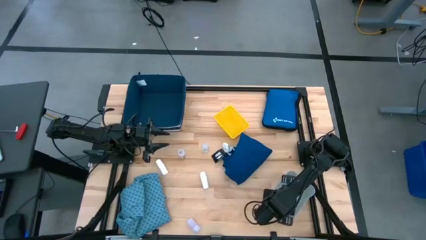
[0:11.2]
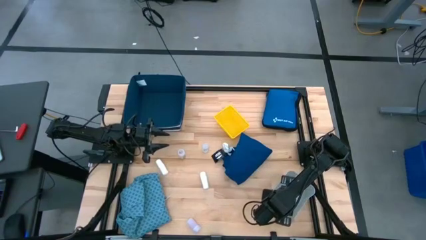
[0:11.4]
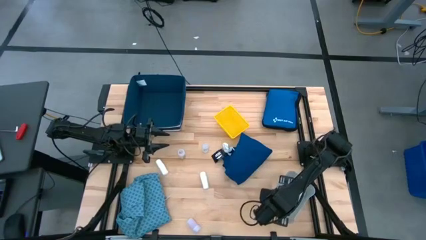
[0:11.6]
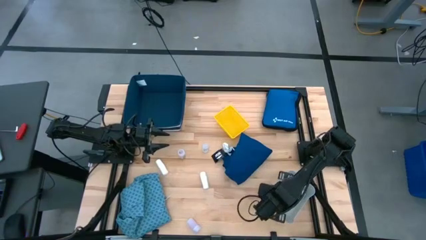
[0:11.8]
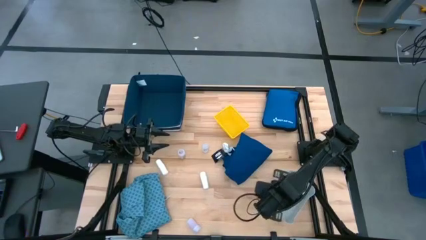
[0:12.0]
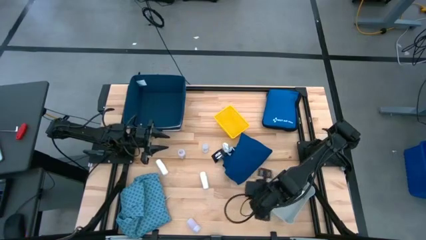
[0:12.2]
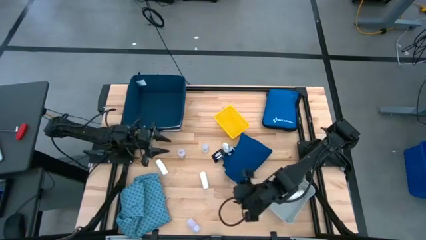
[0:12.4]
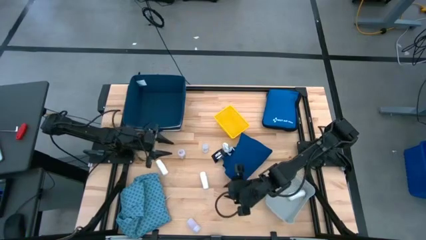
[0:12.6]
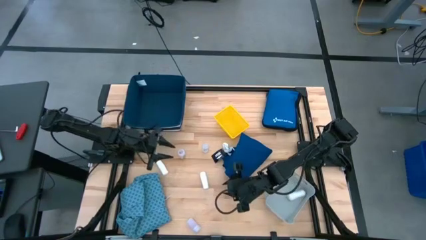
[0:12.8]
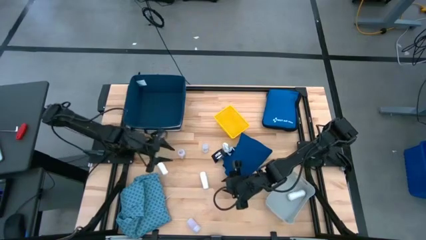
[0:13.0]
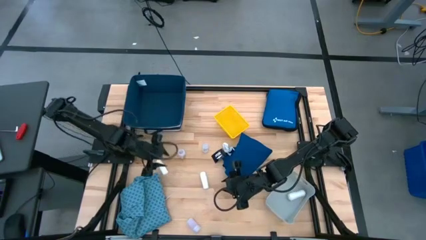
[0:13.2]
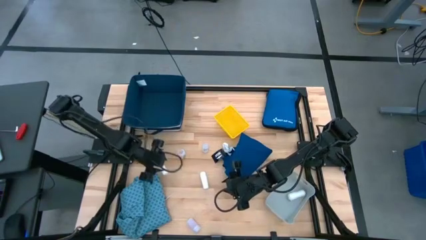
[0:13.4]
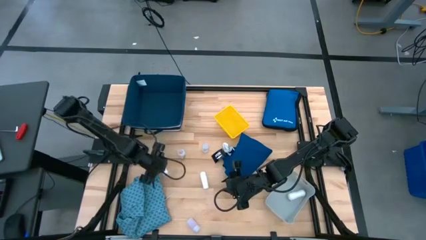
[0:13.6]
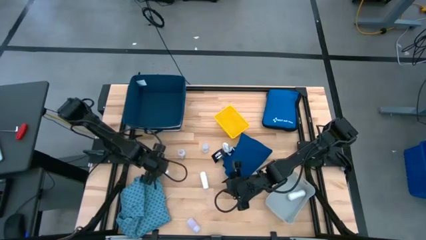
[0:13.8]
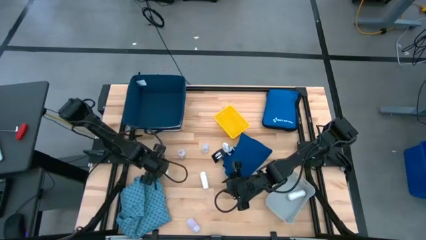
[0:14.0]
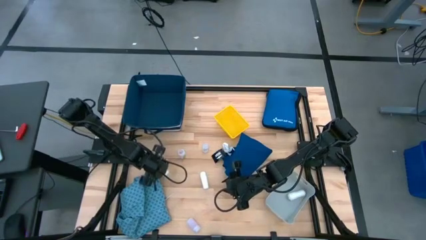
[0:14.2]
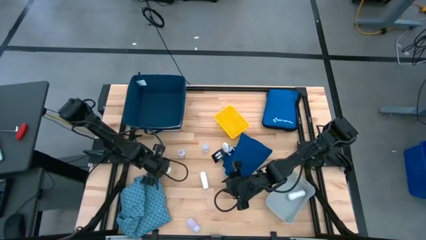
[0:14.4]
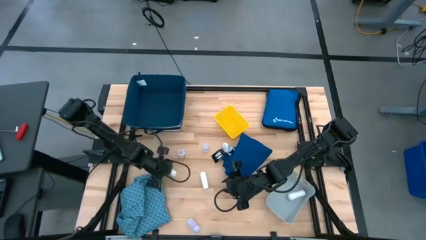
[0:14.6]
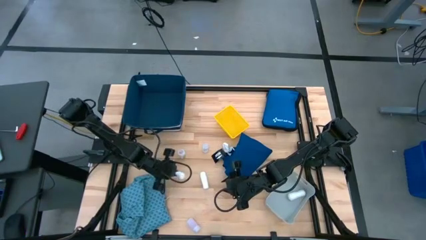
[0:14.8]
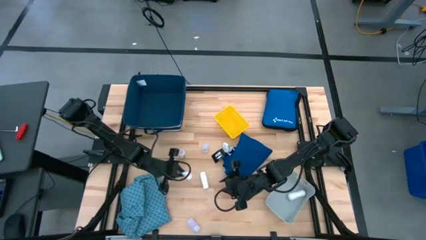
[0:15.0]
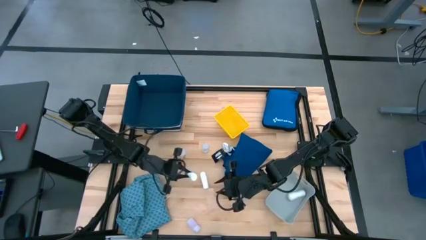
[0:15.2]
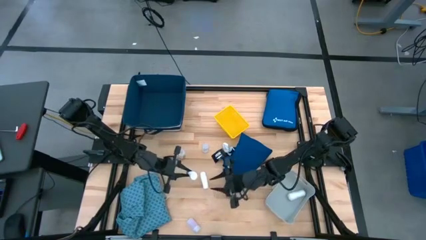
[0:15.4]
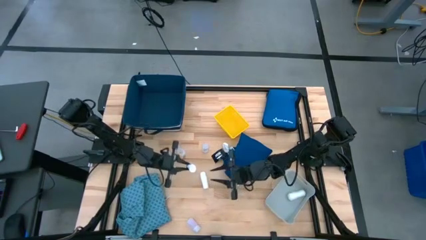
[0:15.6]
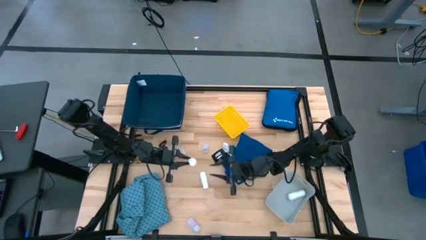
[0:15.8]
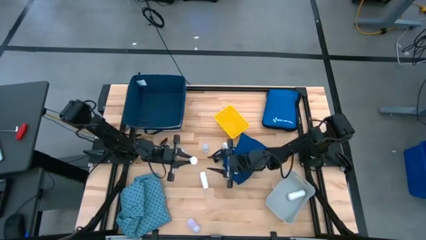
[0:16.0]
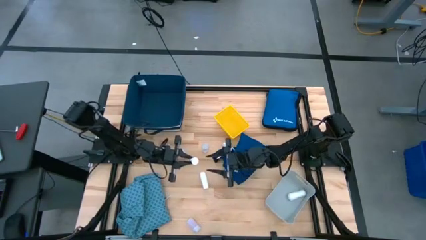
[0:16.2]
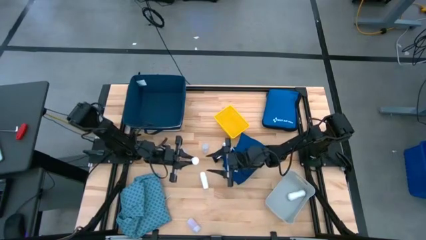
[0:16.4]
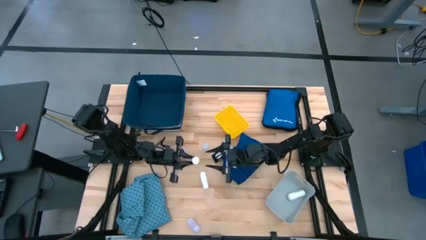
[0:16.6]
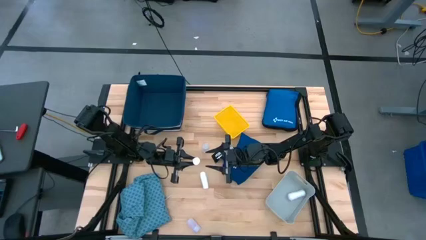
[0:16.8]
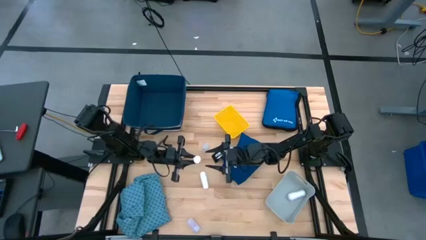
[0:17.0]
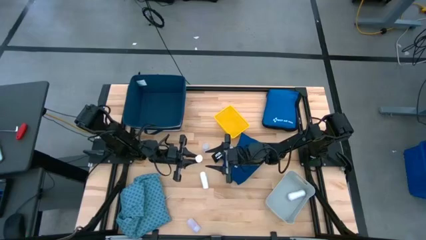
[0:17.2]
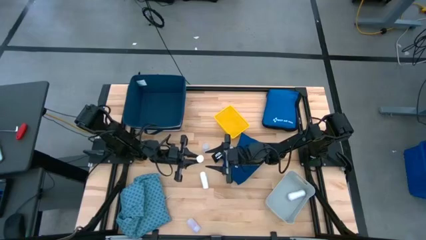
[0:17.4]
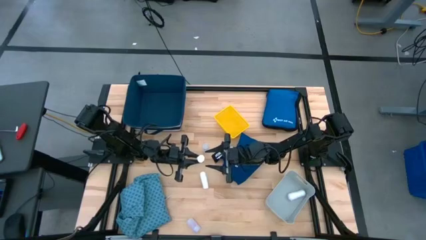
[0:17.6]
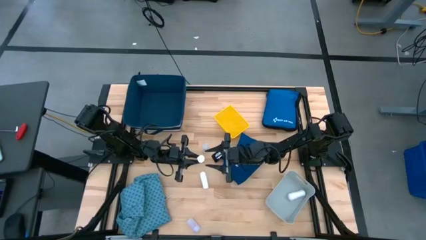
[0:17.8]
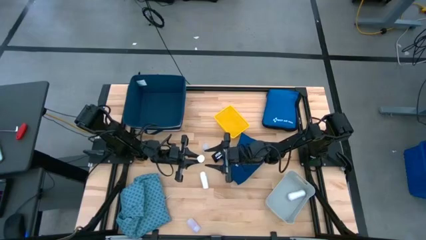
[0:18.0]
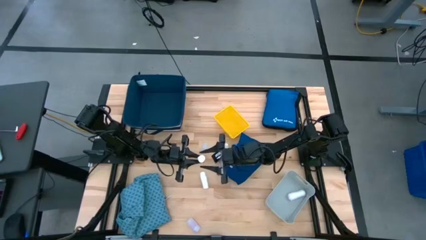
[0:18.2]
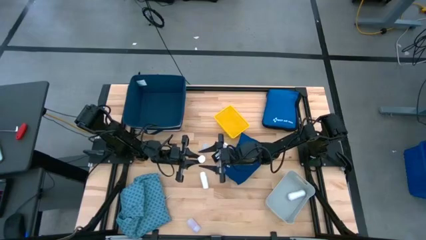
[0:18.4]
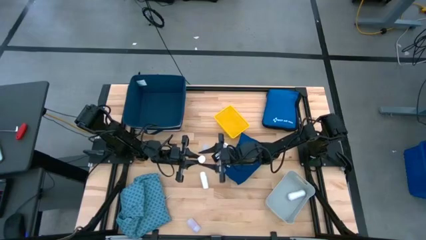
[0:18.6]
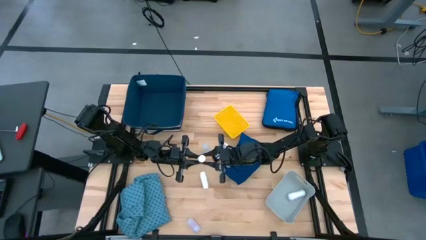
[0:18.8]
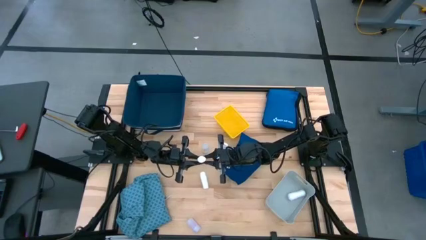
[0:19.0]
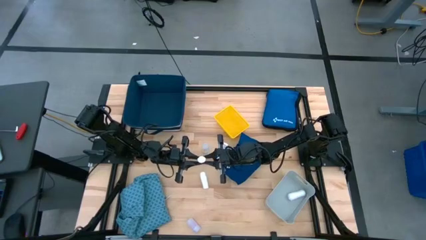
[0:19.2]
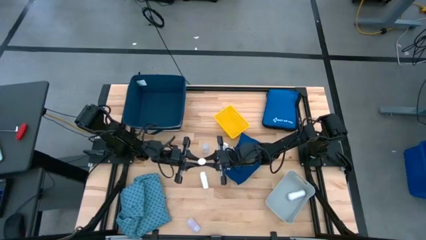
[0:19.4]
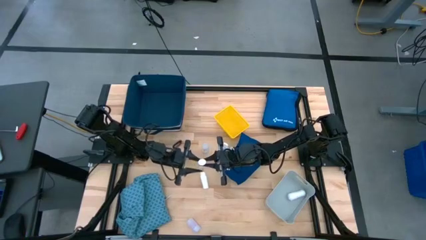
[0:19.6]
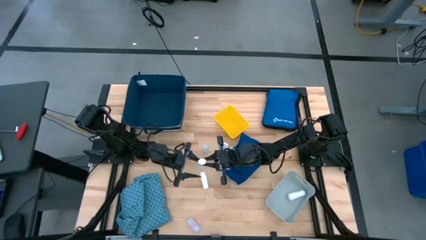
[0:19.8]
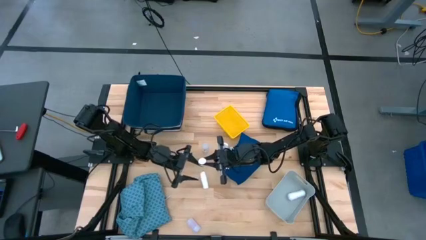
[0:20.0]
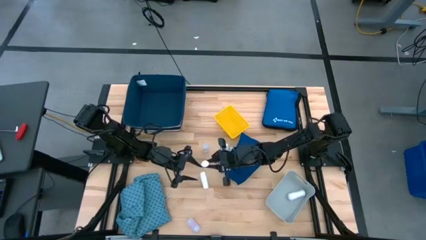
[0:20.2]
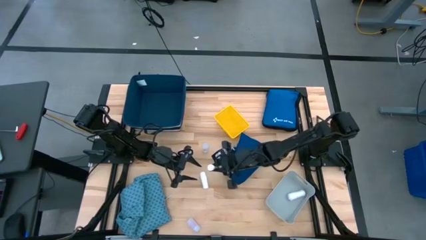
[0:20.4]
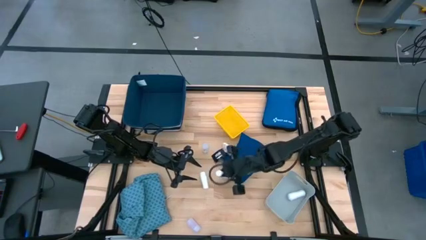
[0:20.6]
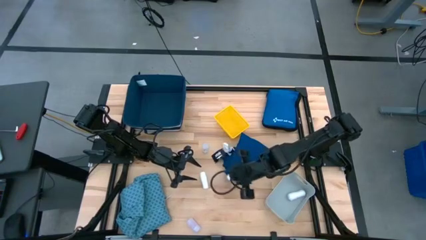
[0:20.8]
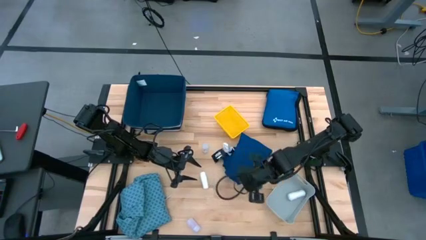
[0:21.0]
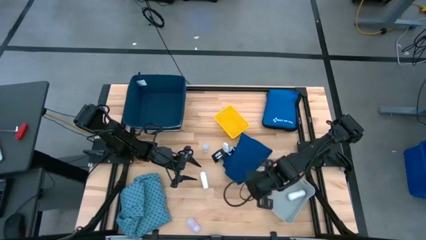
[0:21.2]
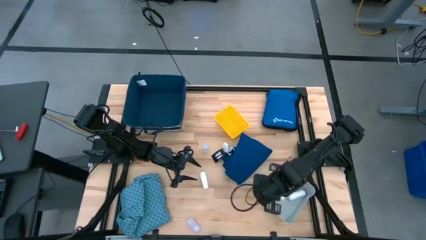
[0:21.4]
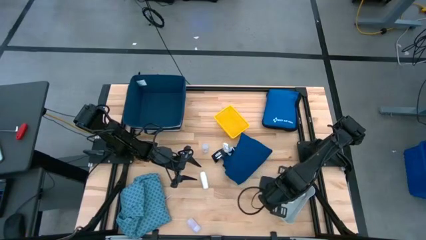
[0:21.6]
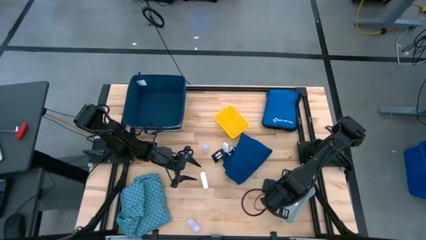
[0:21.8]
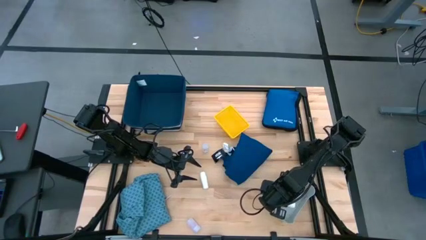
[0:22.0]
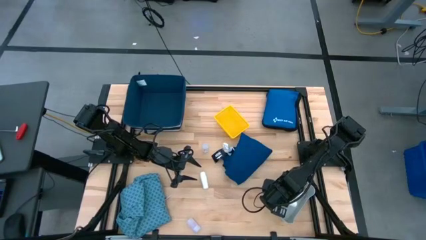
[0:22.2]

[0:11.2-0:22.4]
Task: Pick & place medical supplies in basket/bin
Put the left white rolled gauze into the gray bin
